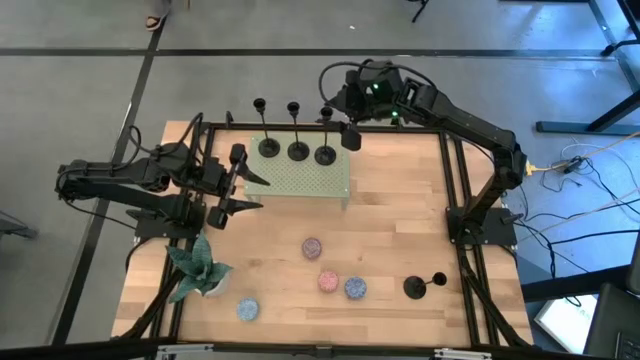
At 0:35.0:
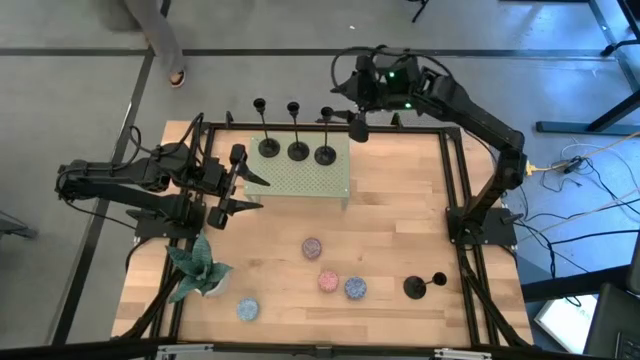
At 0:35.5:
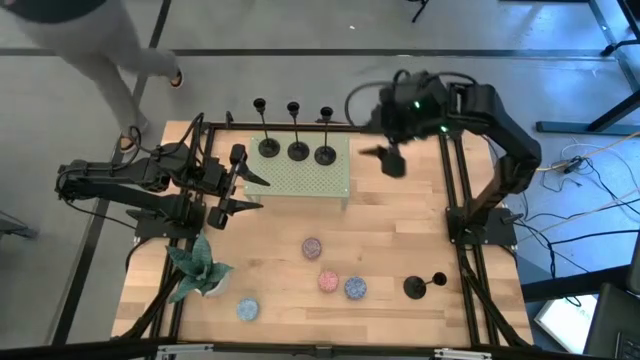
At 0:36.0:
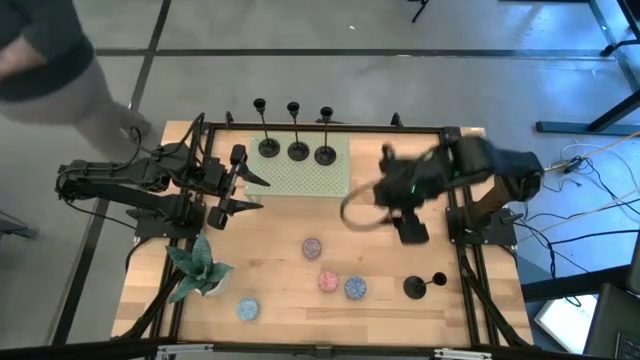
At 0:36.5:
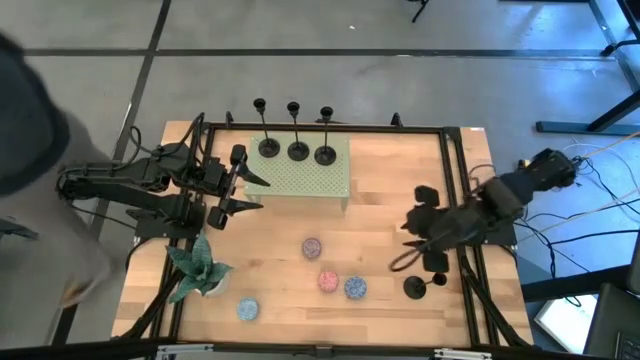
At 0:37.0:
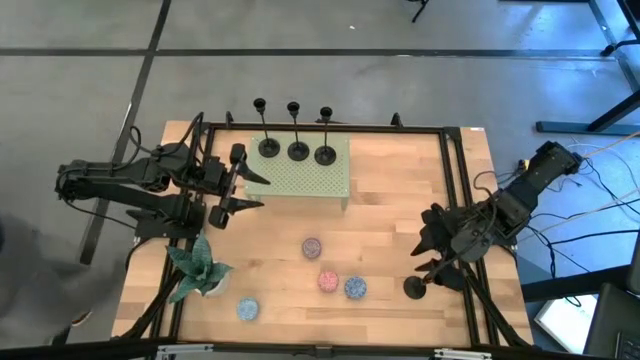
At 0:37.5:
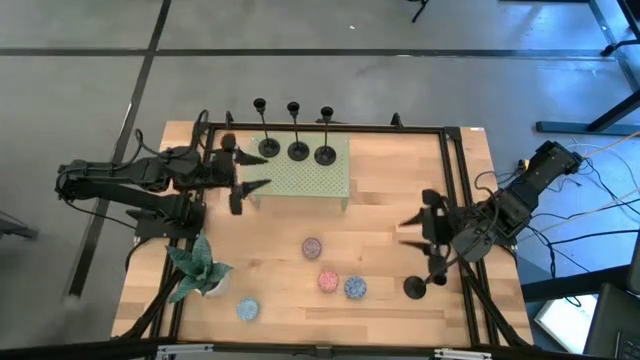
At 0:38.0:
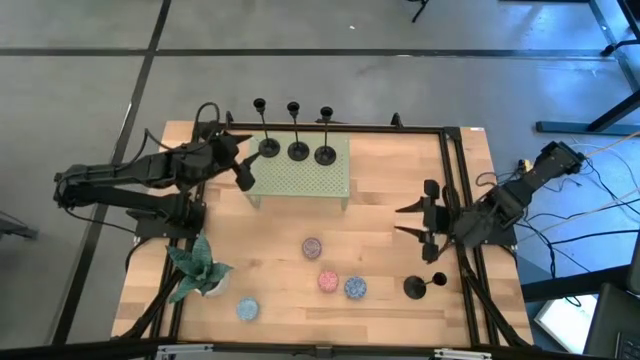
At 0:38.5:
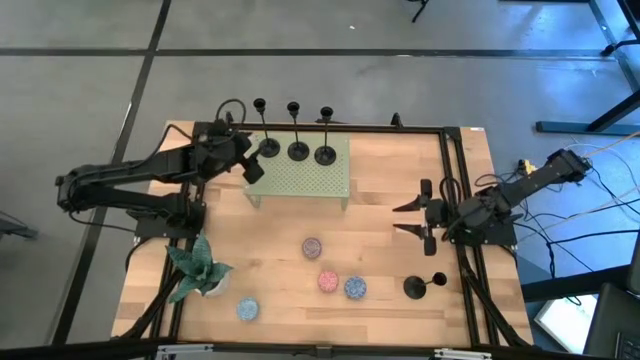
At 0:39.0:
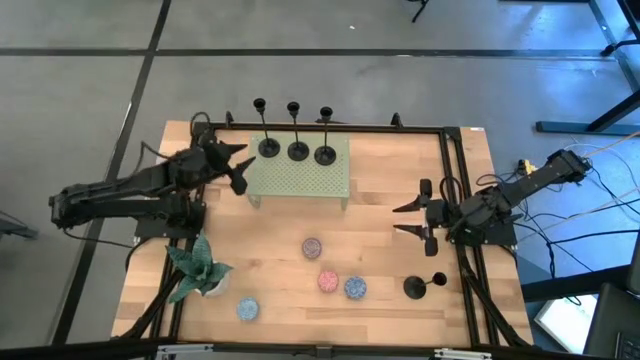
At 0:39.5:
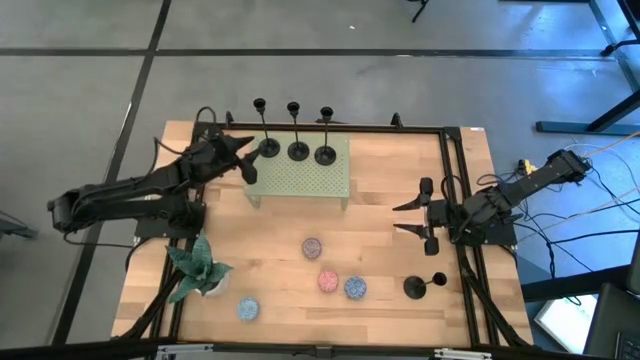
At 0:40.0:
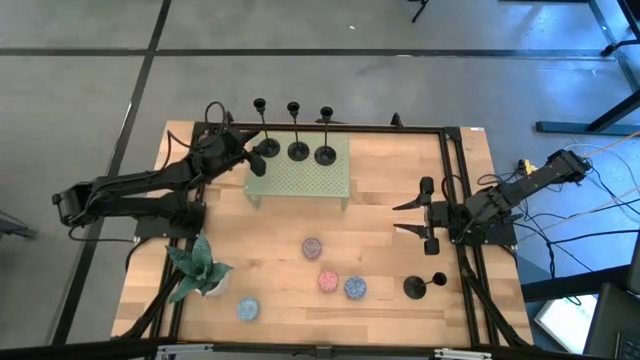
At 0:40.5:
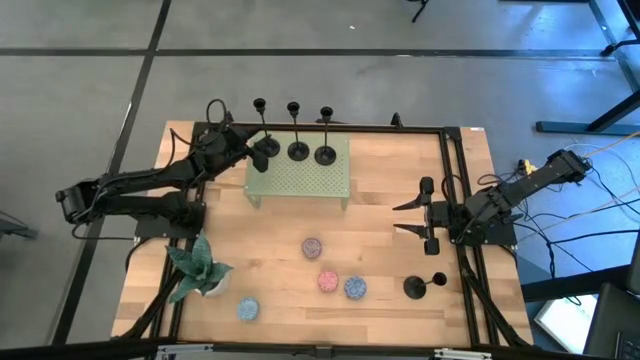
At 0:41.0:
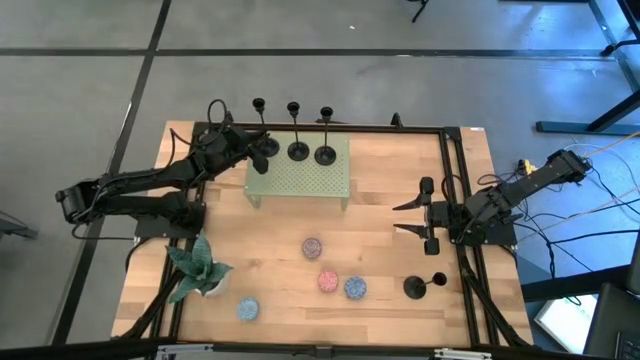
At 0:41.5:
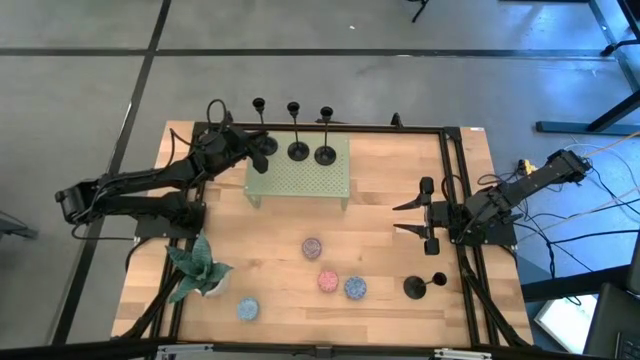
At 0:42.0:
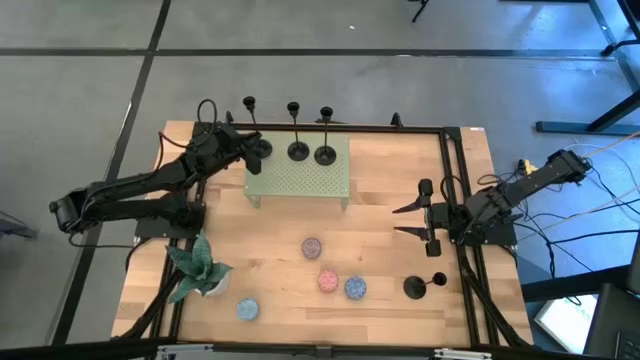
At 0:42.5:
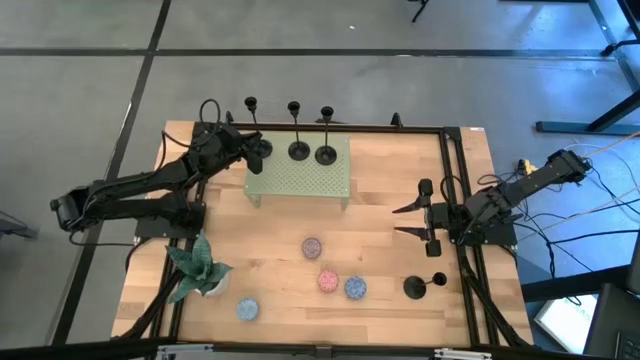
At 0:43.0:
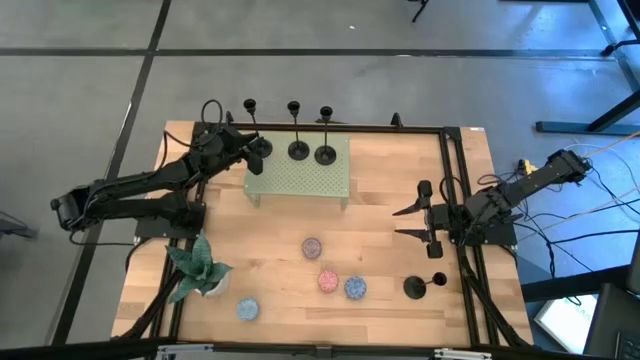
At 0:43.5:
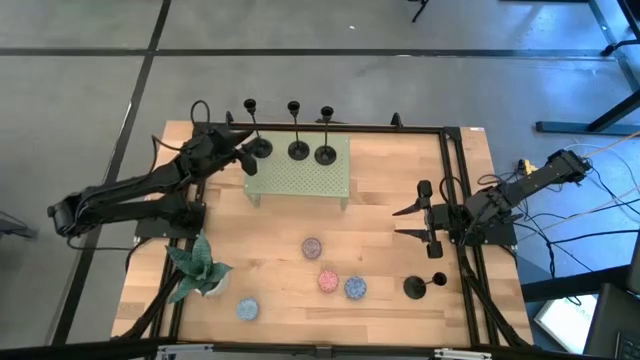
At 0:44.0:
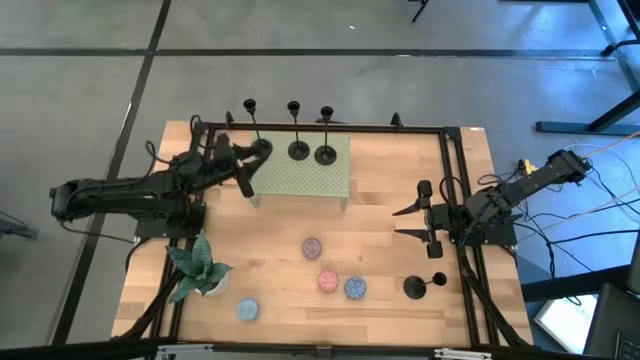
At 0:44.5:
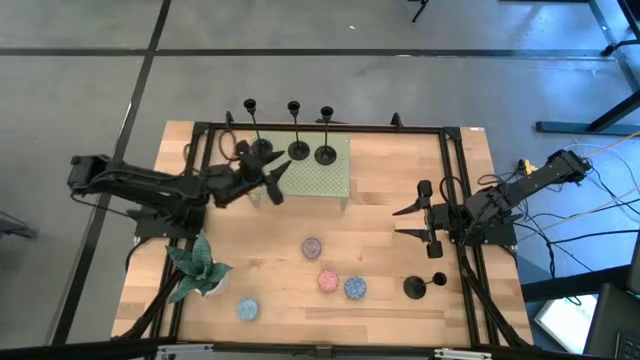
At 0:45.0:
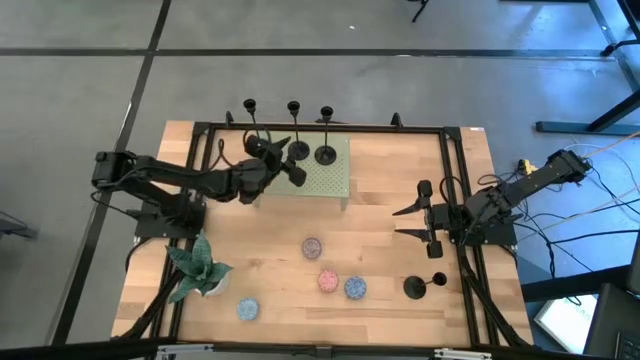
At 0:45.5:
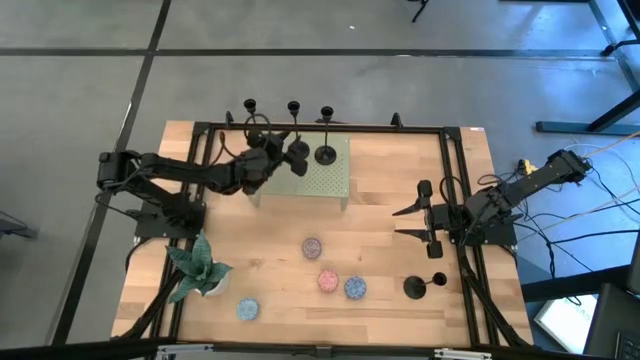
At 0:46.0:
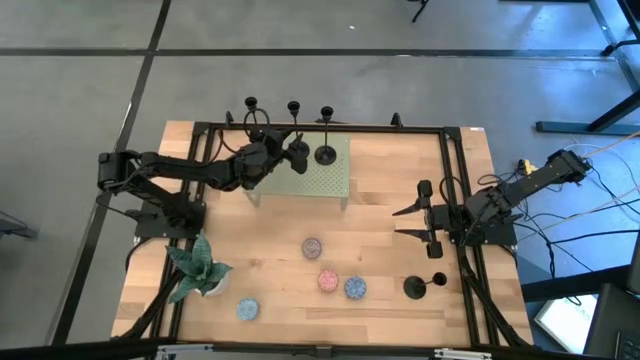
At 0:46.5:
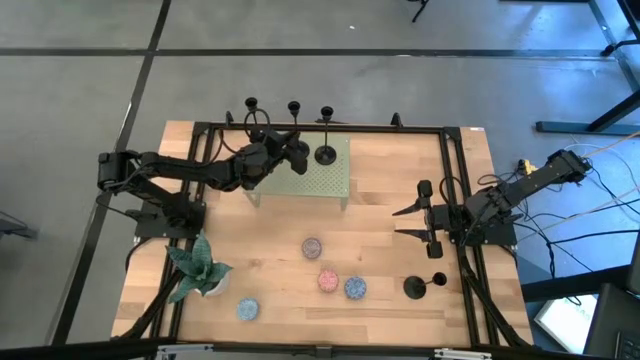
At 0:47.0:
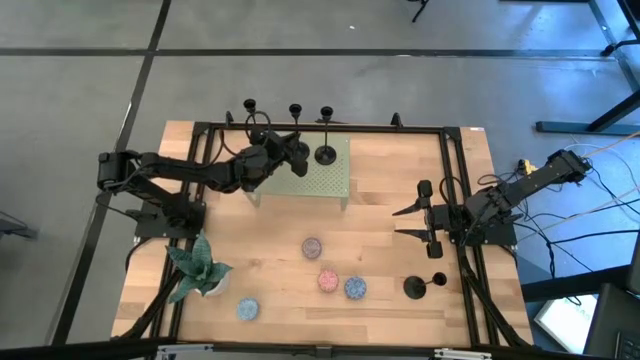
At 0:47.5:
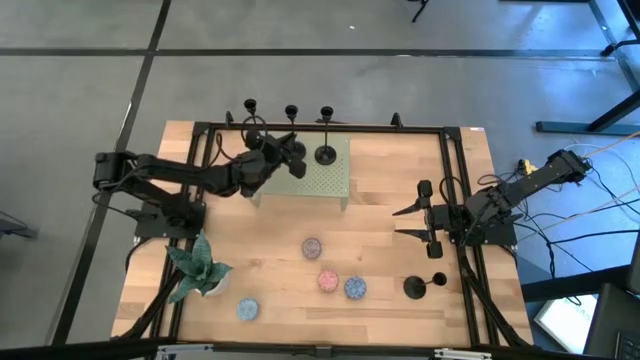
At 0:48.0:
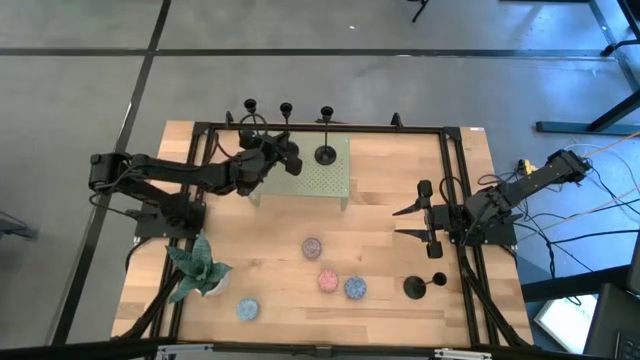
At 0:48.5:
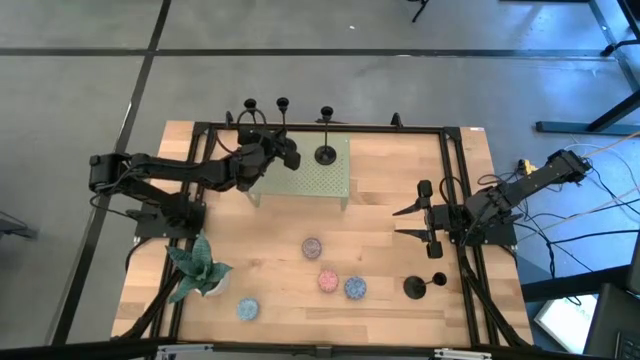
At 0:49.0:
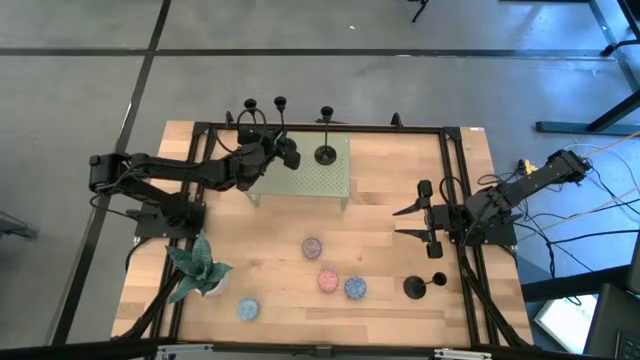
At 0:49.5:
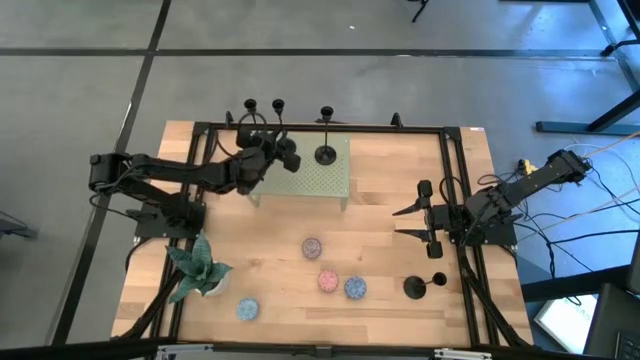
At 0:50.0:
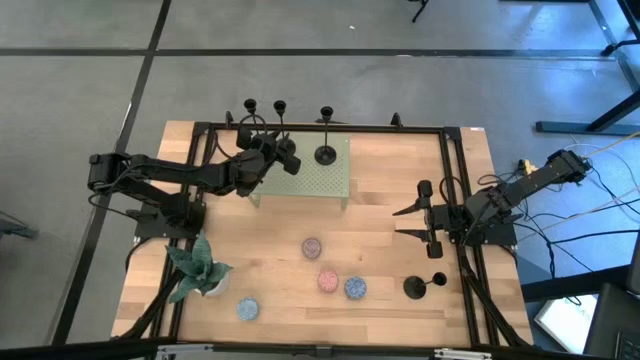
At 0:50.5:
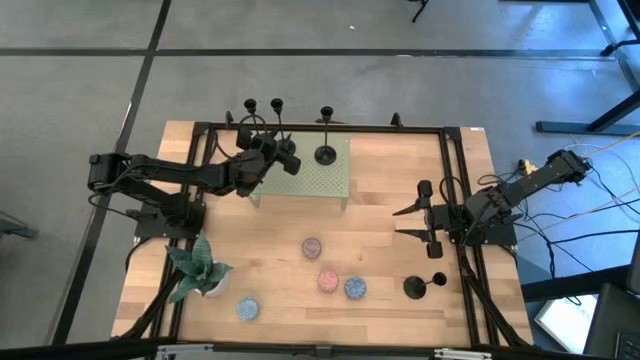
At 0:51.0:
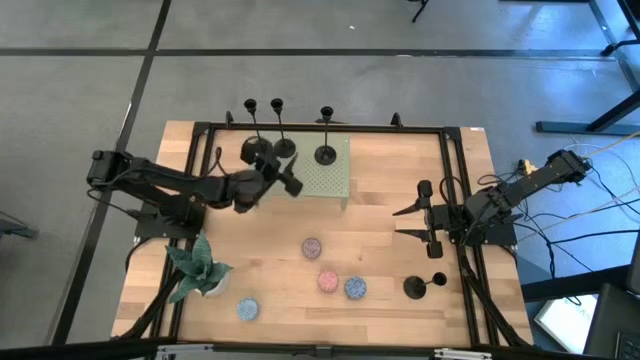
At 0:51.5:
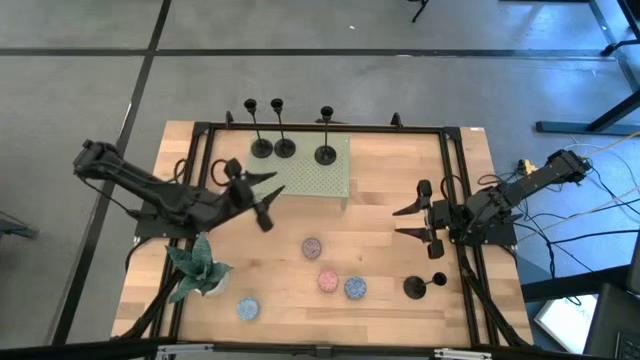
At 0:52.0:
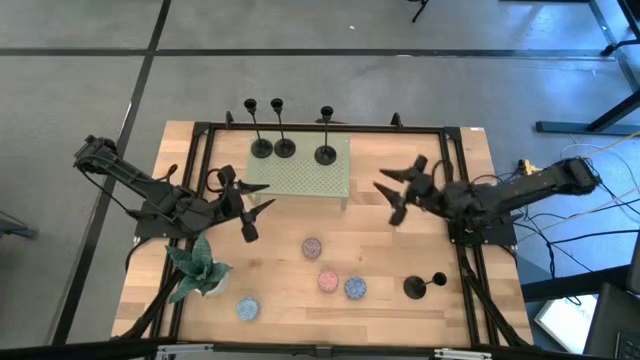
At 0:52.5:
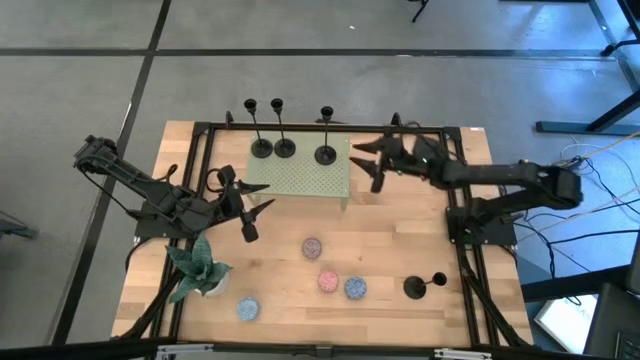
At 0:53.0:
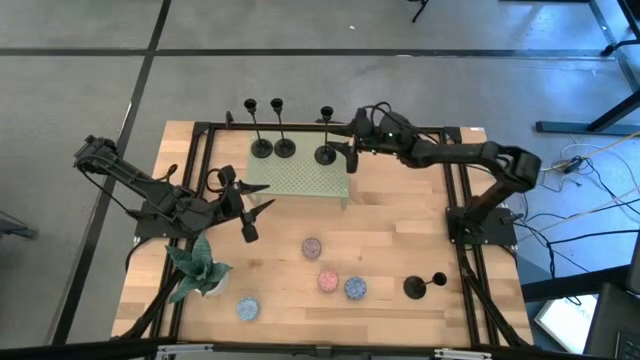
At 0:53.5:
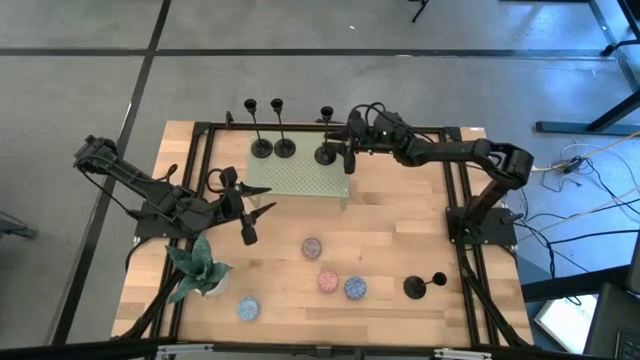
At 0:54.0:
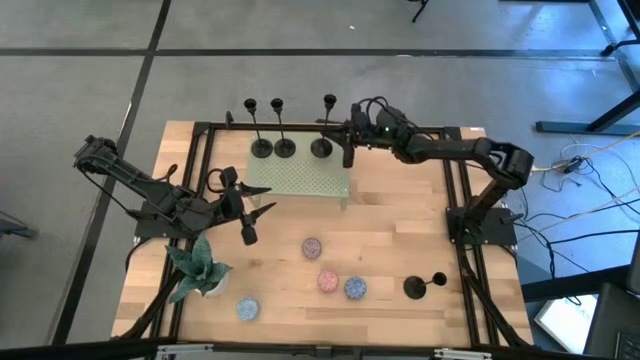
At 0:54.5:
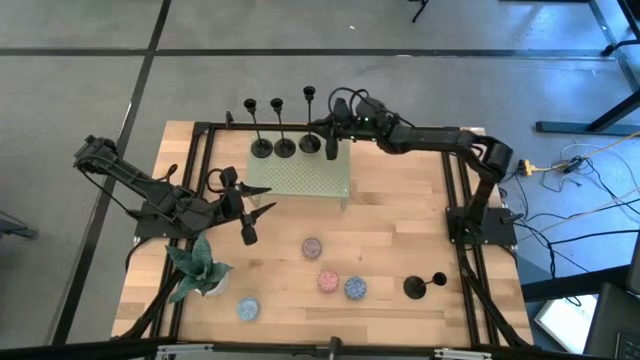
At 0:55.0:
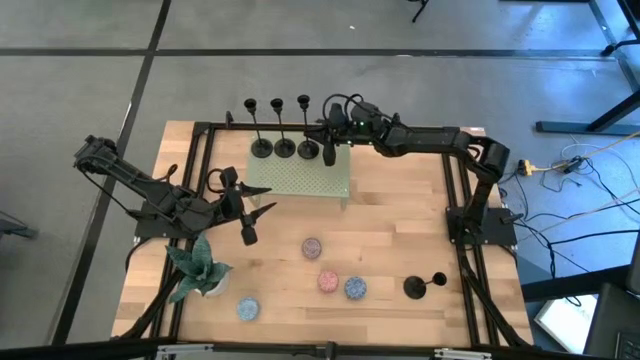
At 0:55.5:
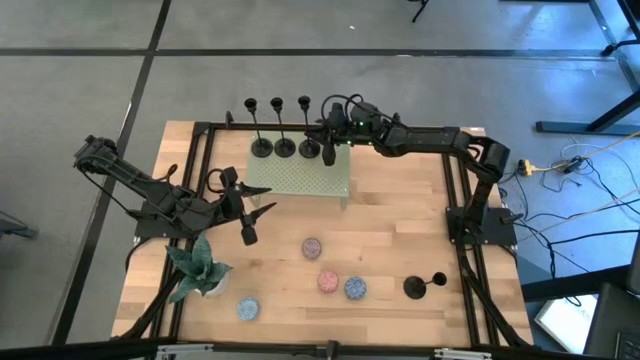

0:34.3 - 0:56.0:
Task: Pick & Place candle stick holders
Adjust the black candle holders on the shelf
